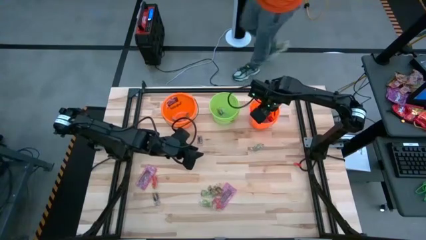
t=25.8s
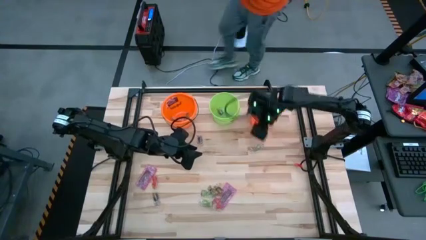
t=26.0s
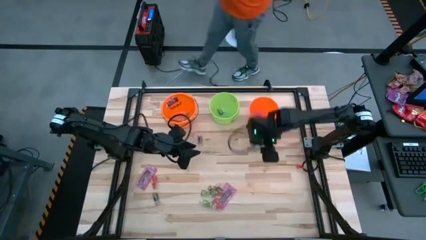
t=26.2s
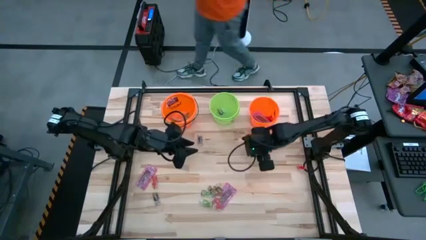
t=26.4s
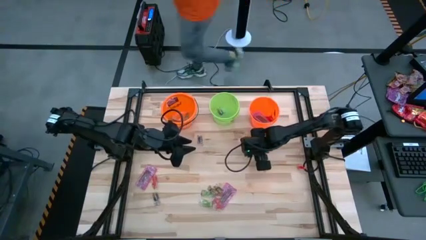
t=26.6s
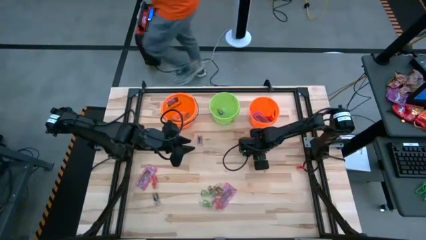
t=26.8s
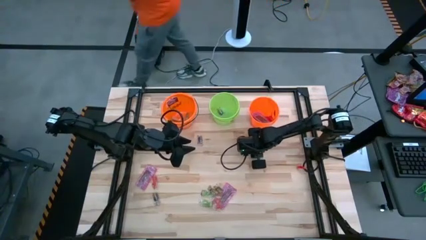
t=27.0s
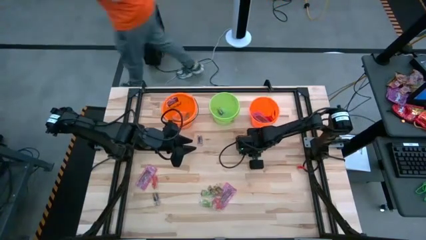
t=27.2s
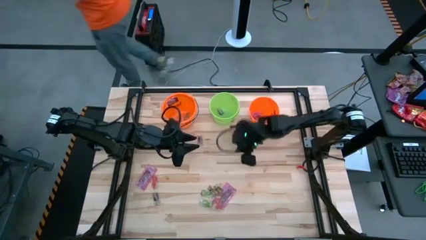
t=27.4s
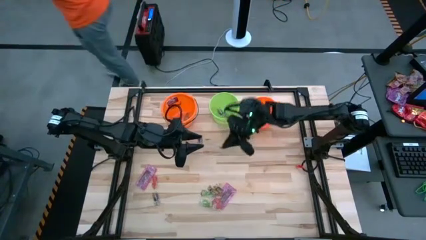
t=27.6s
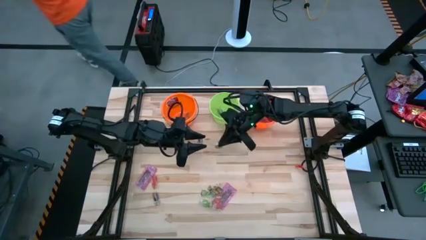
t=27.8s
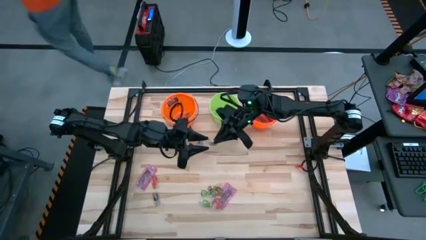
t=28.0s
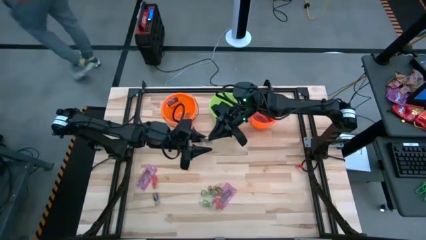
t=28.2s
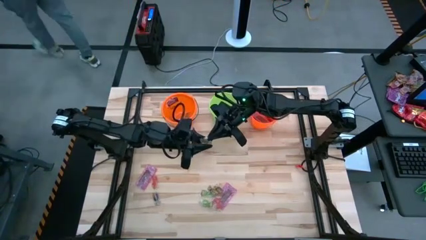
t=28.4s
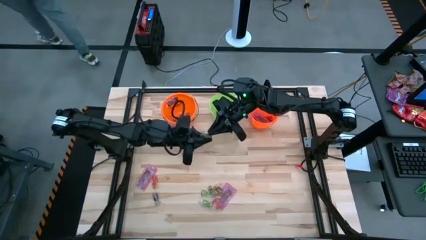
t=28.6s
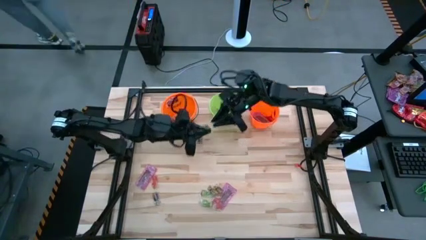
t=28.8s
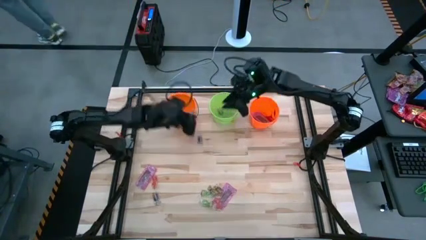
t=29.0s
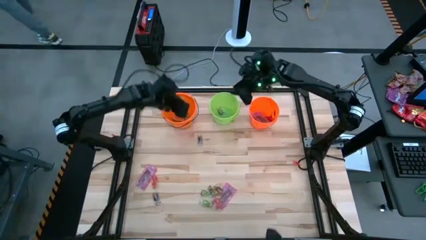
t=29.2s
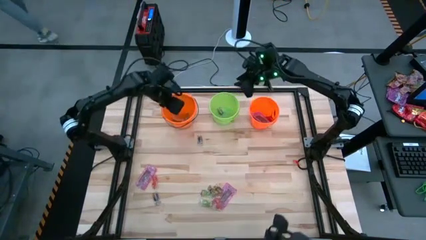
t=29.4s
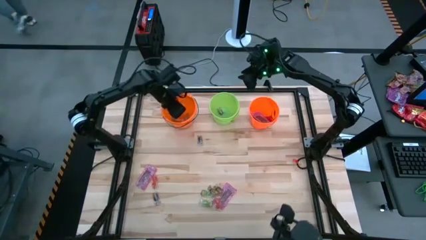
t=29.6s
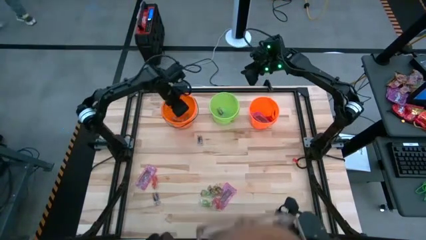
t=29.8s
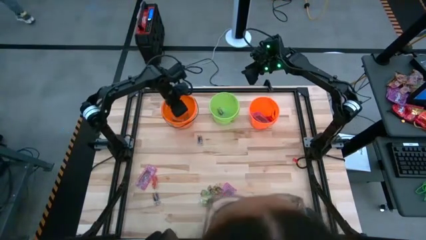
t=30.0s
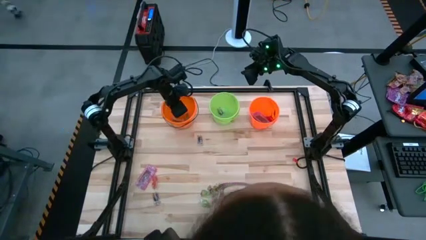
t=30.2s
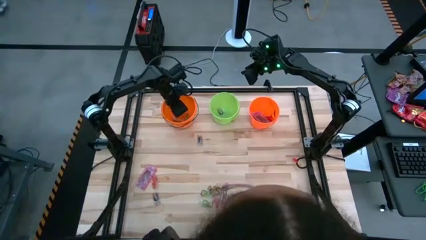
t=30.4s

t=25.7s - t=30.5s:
Task: Sort candy by brand, put in halloween buckets
Put the green gummy into the left orange bucket

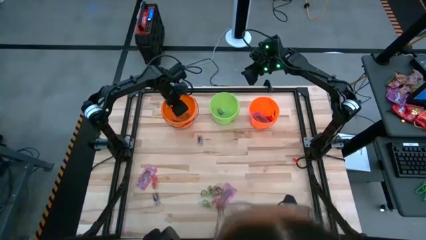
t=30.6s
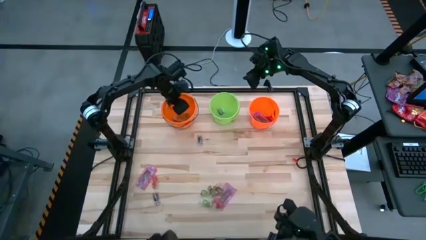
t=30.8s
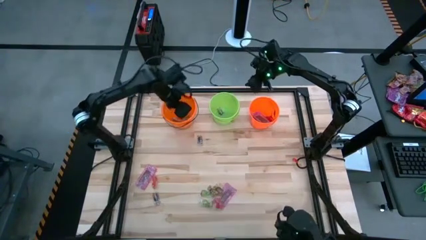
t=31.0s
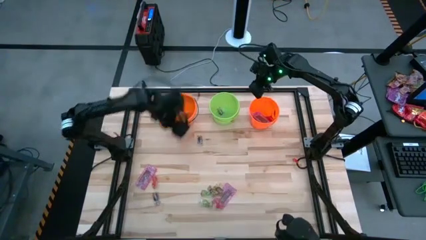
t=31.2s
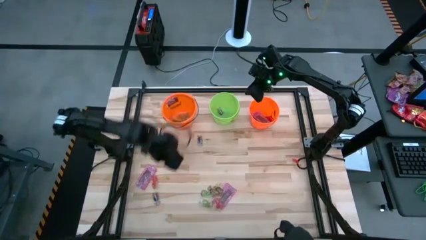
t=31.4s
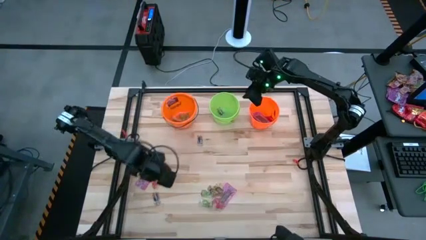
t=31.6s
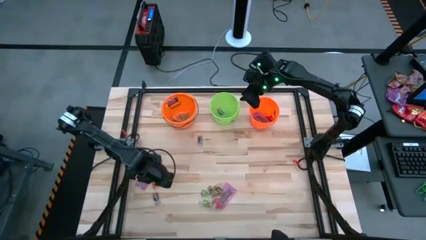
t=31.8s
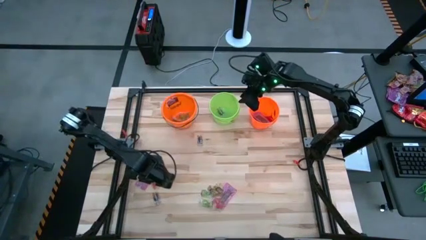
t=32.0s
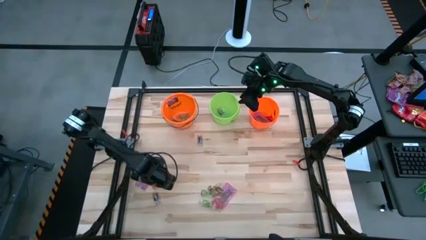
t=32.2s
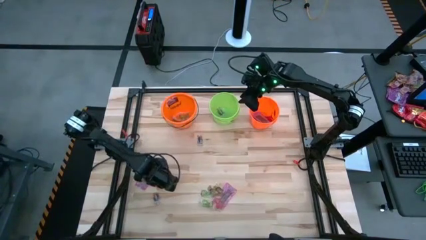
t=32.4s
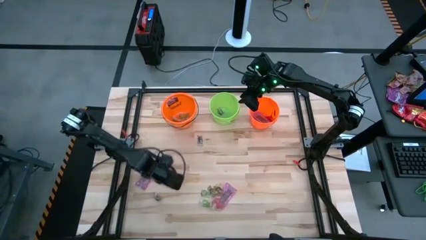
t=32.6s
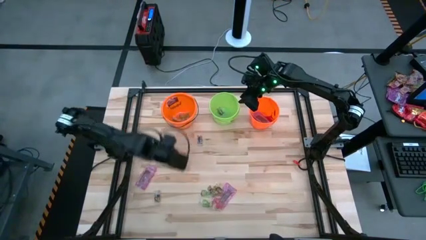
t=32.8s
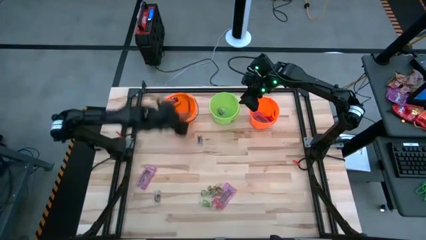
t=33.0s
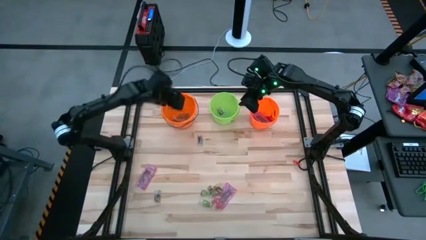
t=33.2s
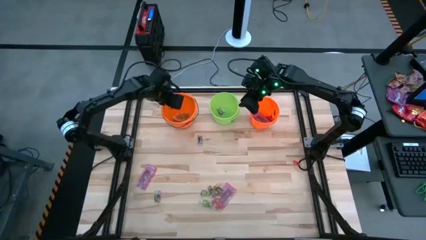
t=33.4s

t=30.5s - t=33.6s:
Put the red gummy into the left orange bucket

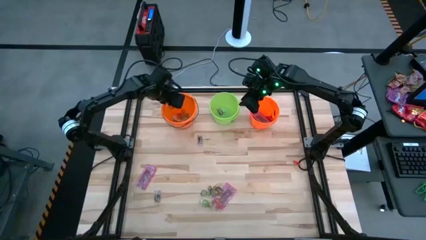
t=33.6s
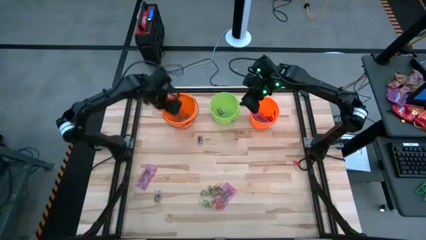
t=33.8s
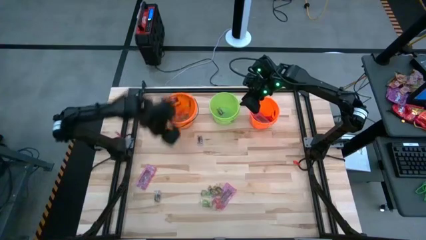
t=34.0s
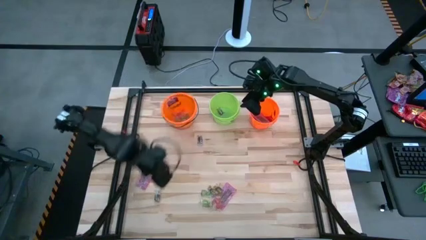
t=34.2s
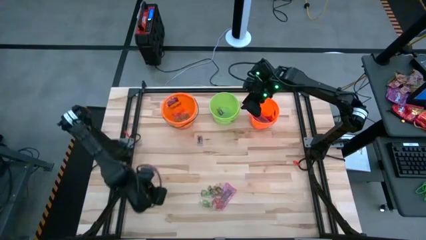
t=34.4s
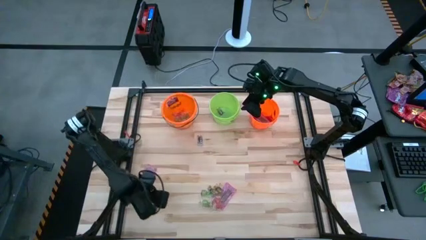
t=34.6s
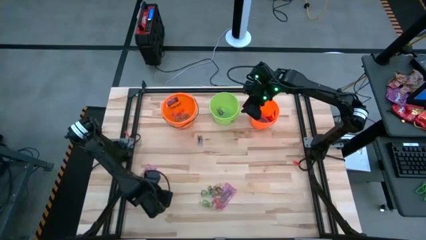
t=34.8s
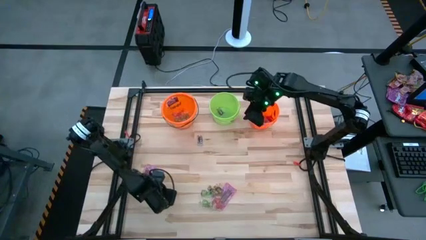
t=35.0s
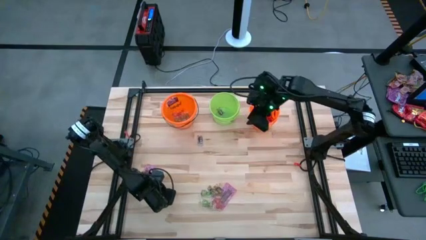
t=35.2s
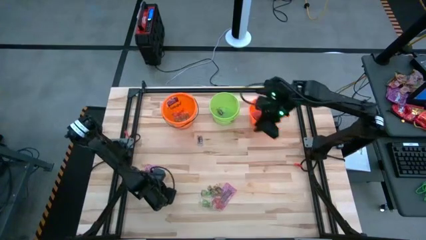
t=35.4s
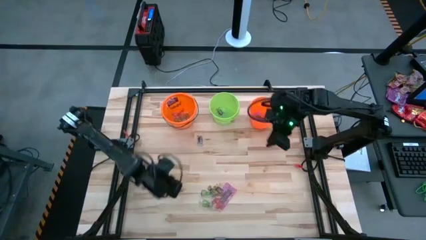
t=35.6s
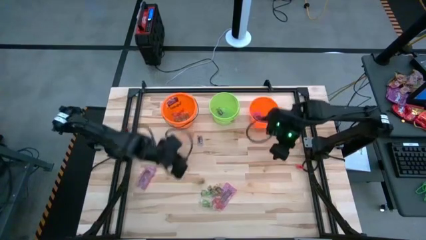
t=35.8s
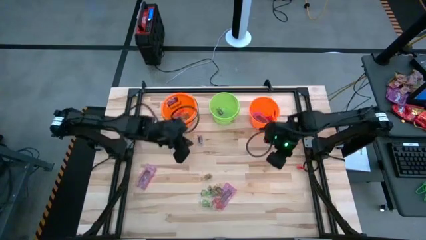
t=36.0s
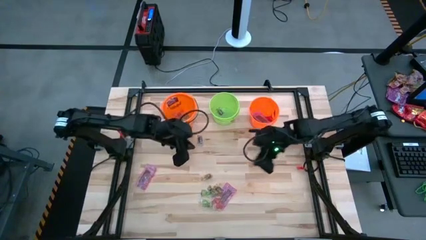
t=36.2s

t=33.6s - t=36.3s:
Put the black candy into the green bucket

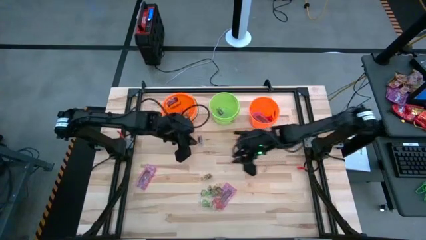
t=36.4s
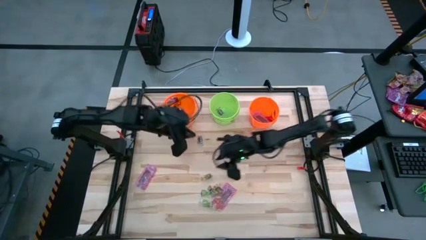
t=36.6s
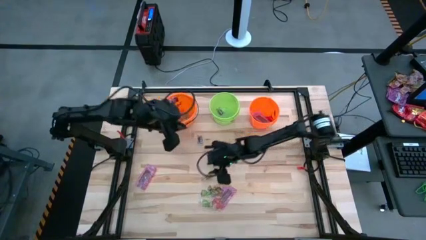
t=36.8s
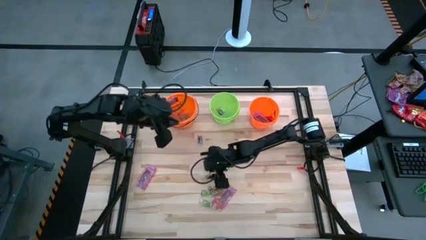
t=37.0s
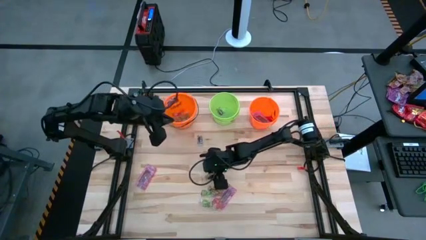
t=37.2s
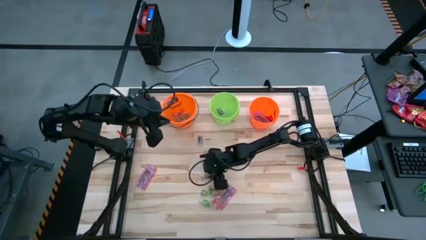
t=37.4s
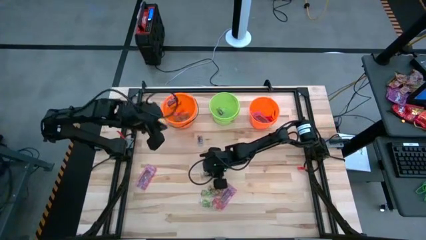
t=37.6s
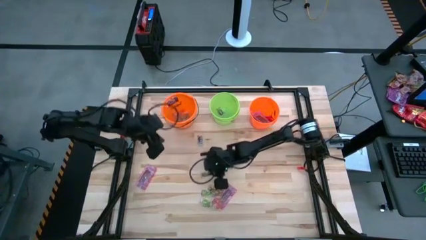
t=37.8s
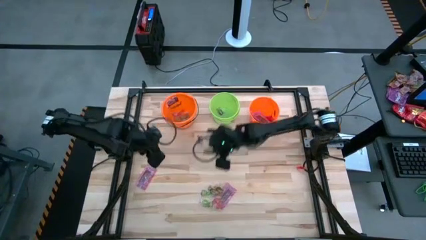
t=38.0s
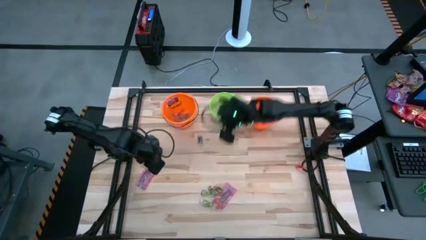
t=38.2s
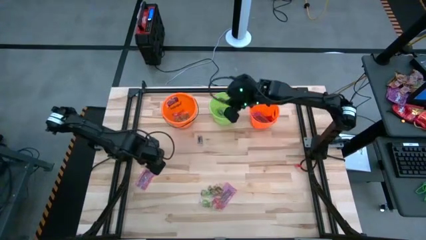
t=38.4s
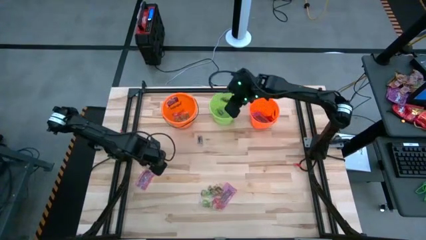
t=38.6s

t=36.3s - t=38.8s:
Put the black candy into the green bucket

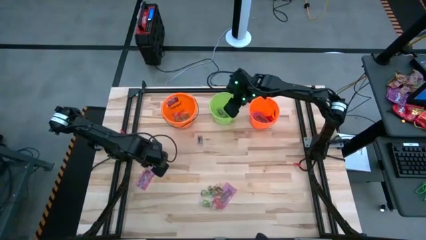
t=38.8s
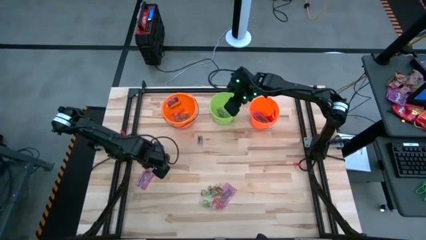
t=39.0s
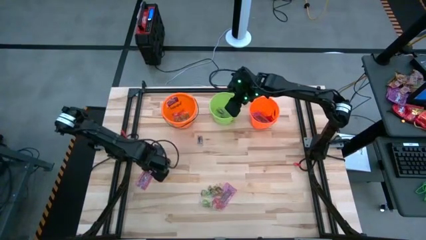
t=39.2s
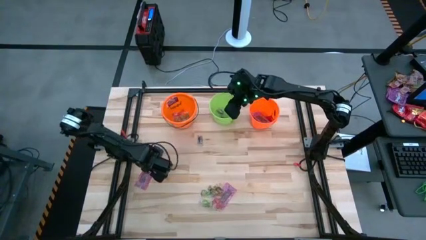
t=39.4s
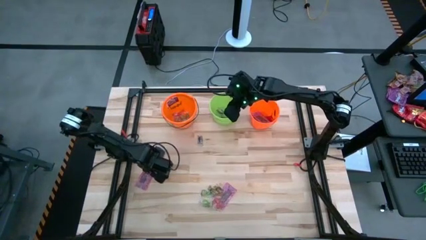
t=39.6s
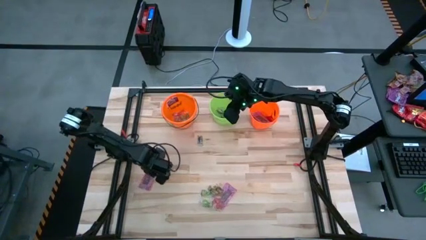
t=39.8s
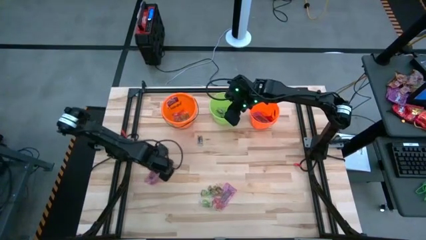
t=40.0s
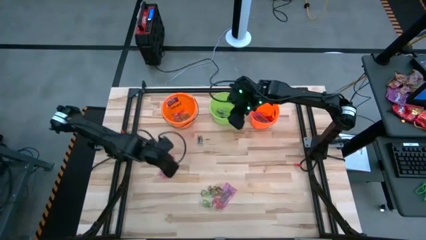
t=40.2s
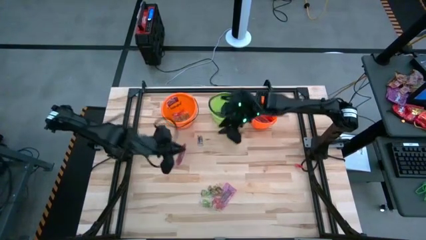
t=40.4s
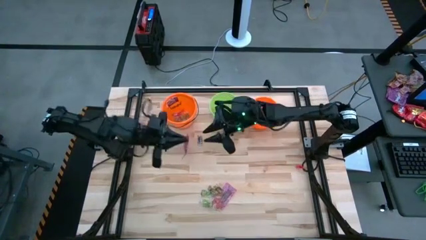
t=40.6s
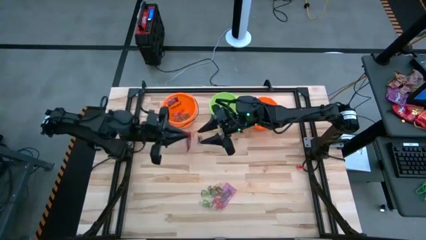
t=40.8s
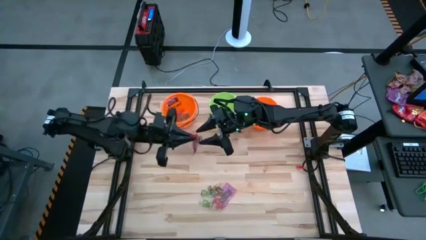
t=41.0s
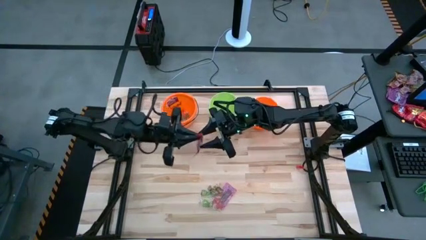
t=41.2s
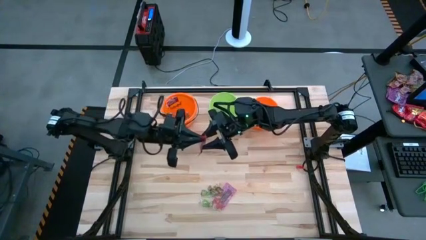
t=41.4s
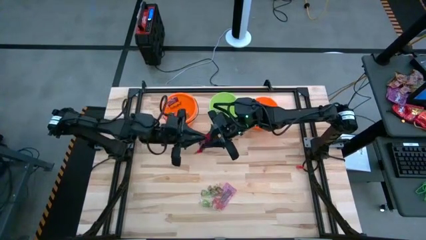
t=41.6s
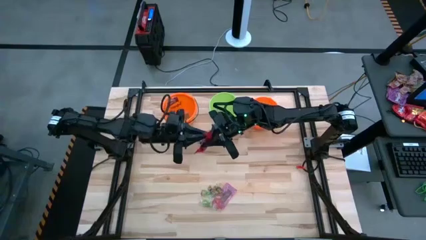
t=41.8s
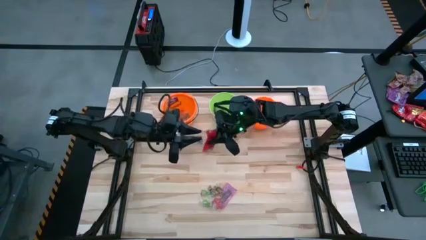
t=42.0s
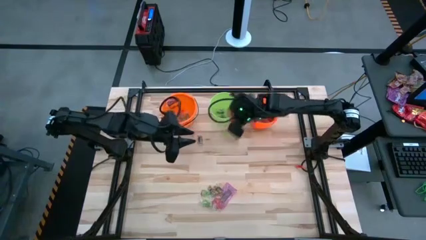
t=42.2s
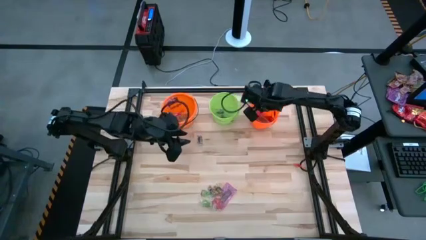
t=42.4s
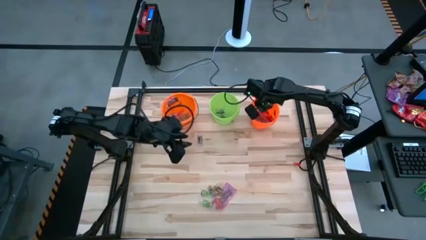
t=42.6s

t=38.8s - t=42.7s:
Put the red candy into the left orange bucket
